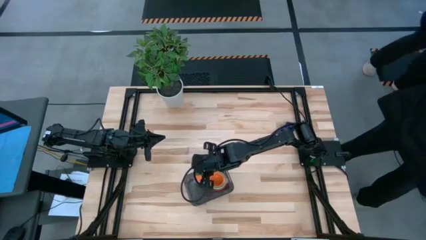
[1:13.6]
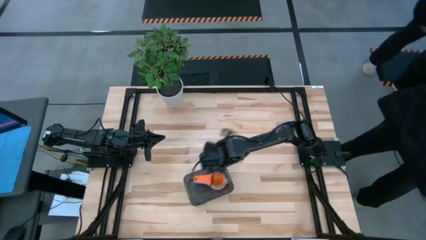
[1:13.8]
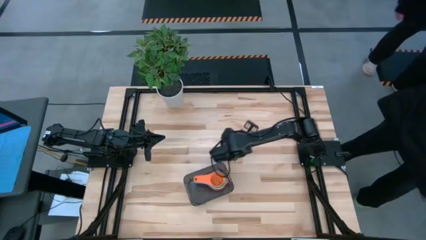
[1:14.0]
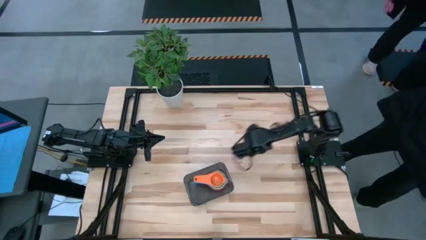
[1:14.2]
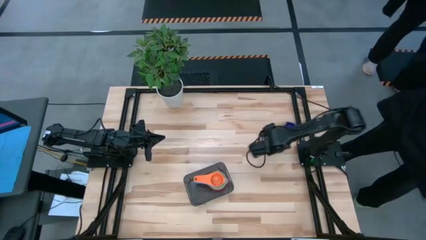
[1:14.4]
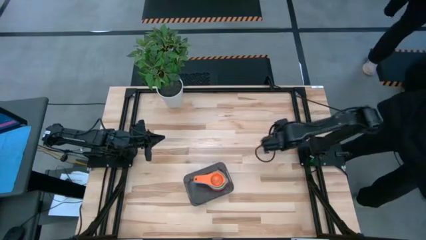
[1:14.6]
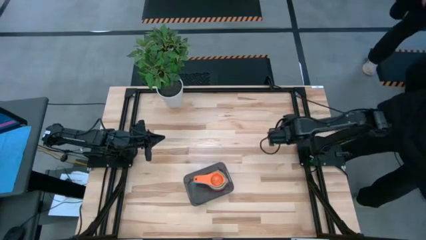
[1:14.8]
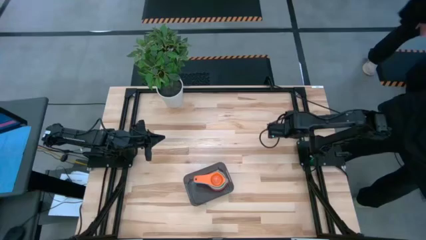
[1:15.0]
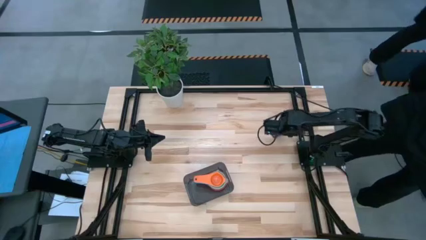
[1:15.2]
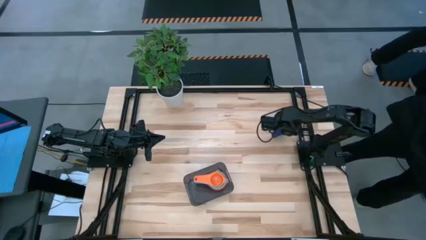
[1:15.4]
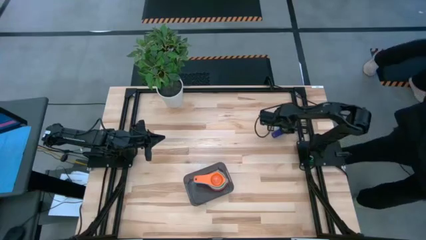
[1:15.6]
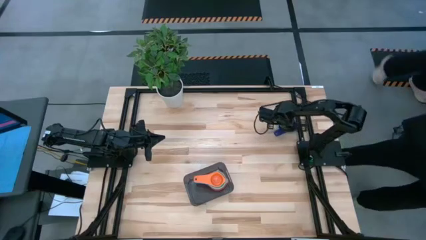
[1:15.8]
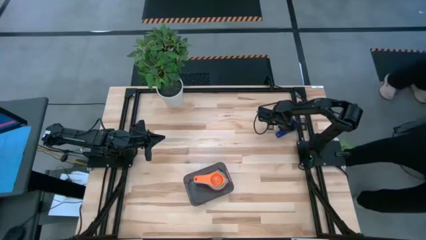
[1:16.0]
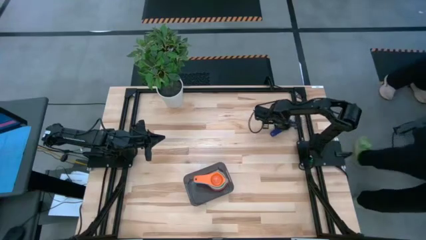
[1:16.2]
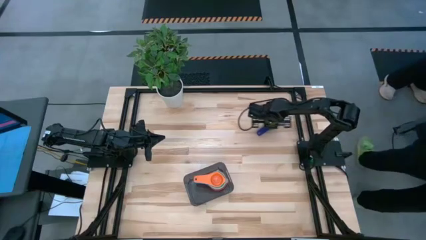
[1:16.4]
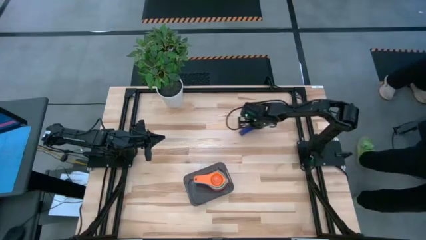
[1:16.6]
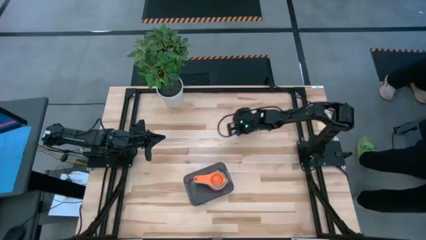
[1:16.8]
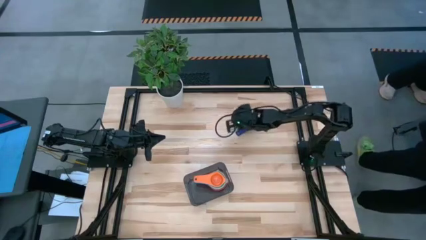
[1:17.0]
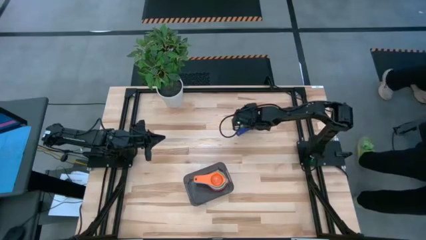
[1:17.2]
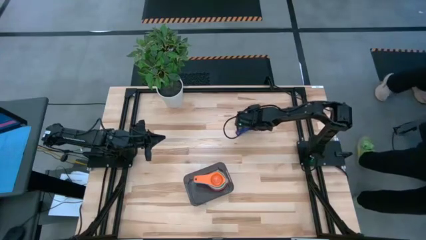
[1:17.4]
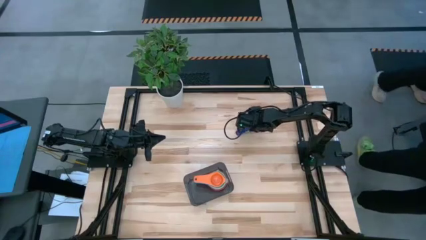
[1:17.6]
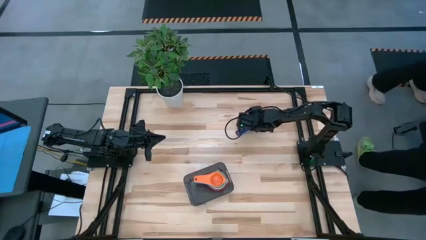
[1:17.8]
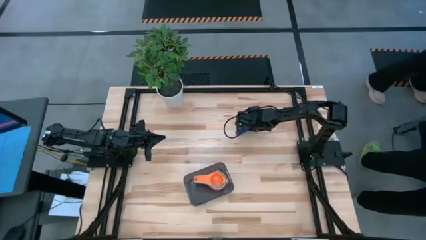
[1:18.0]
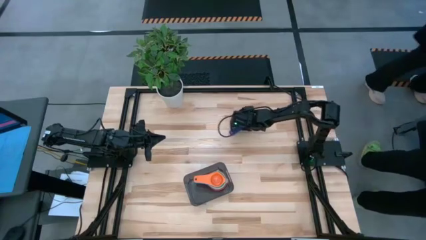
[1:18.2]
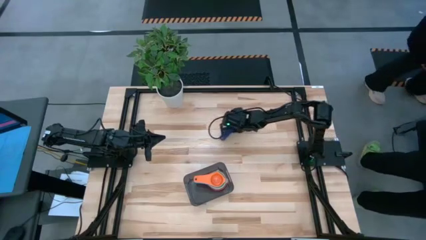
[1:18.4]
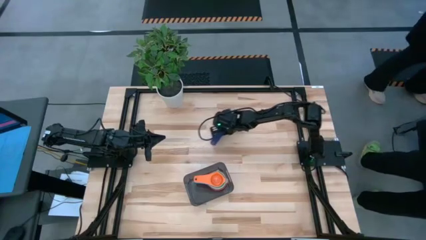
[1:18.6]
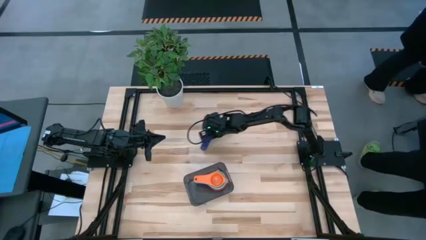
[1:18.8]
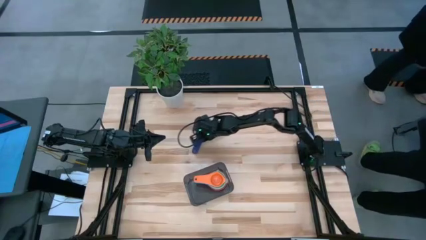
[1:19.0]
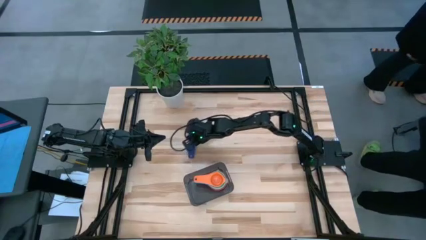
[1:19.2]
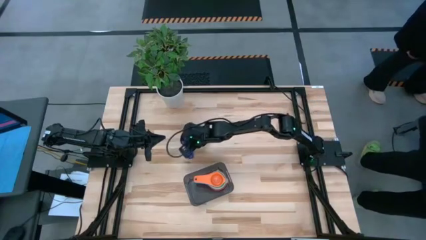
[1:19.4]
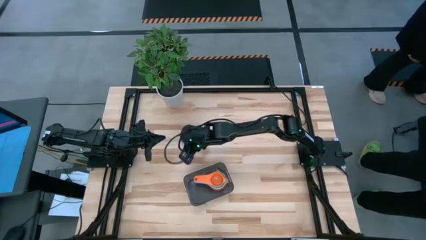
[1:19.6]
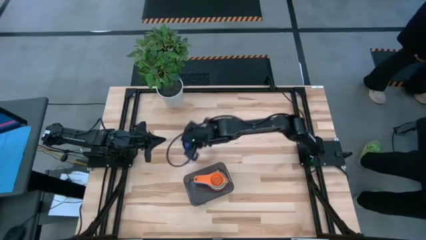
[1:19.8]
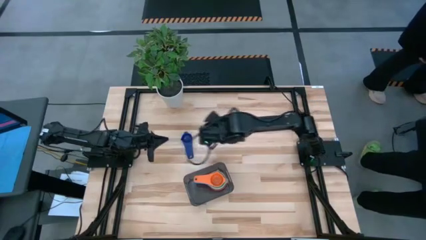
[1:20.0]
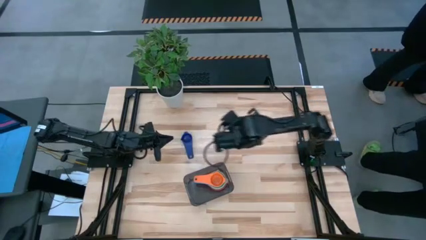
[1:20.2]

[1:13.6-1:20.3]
Task: Nest measuring cups in basket
Move the dark blue measuring cup to the center of the table

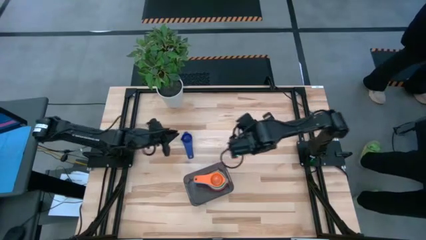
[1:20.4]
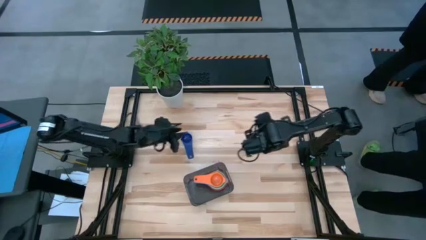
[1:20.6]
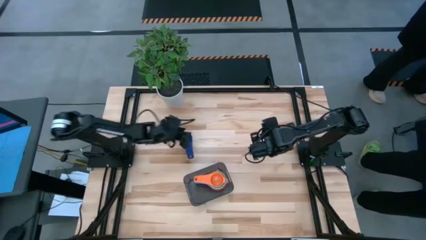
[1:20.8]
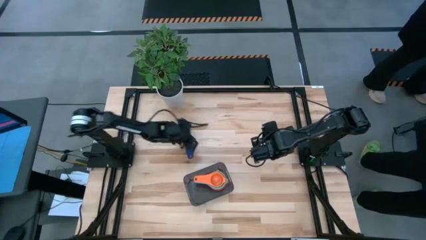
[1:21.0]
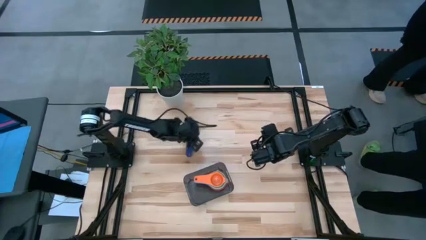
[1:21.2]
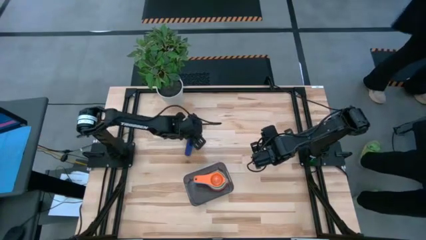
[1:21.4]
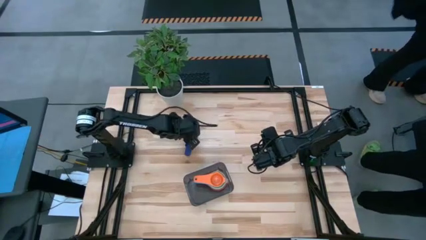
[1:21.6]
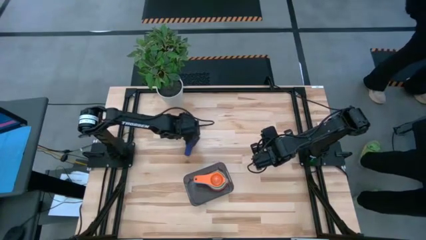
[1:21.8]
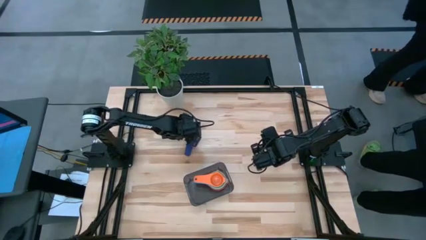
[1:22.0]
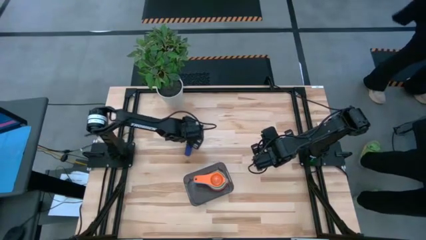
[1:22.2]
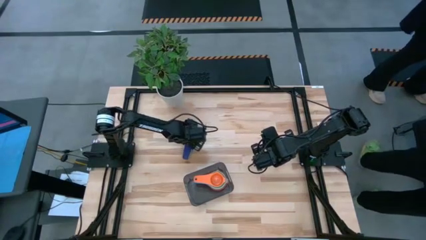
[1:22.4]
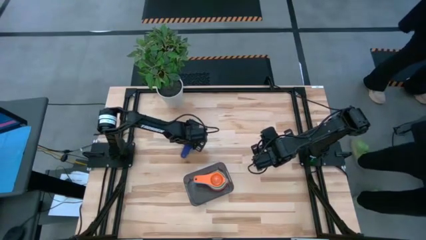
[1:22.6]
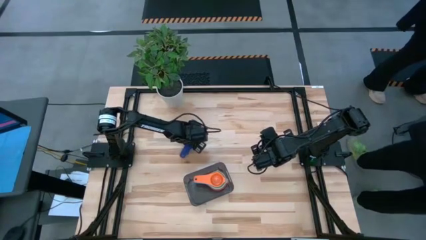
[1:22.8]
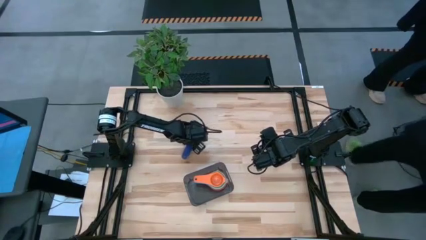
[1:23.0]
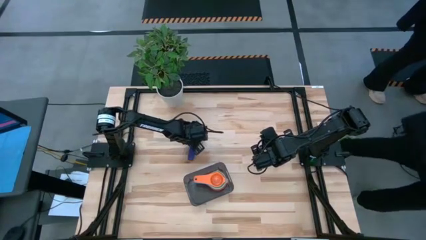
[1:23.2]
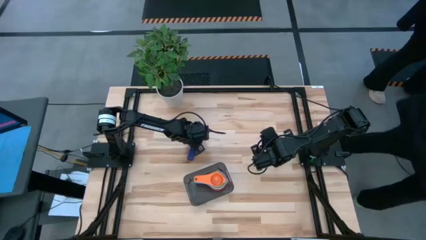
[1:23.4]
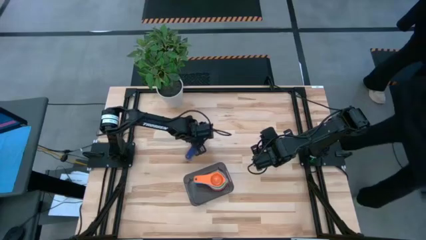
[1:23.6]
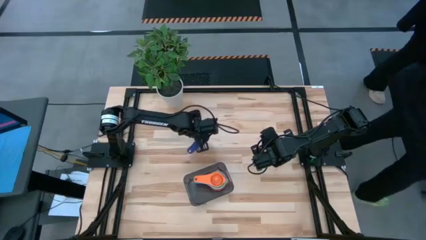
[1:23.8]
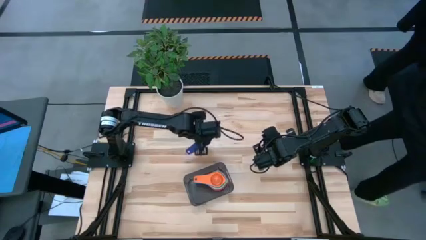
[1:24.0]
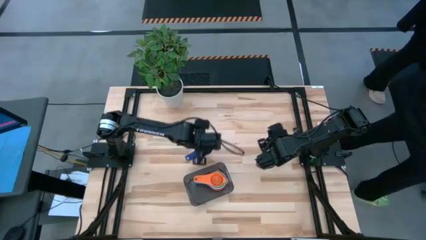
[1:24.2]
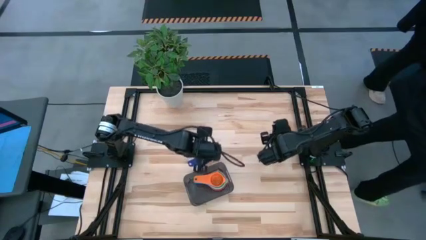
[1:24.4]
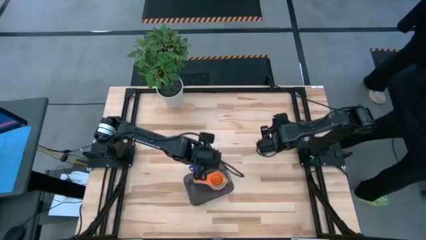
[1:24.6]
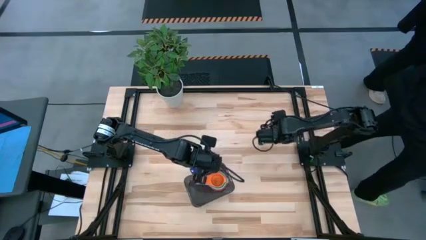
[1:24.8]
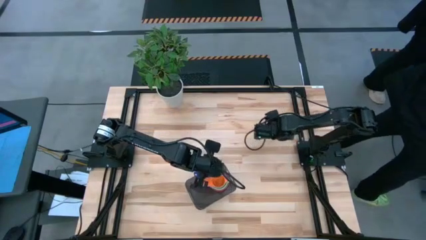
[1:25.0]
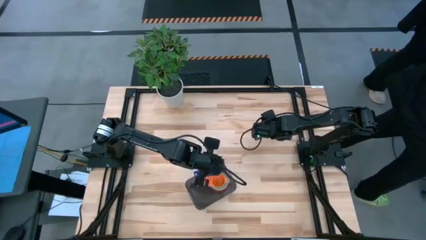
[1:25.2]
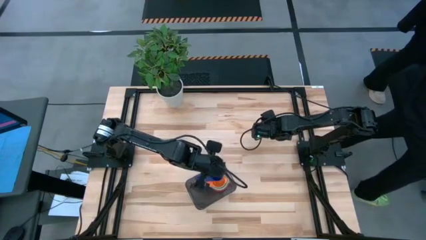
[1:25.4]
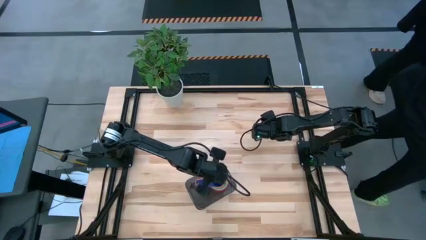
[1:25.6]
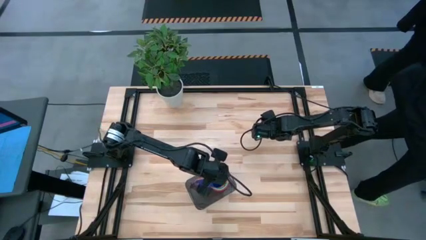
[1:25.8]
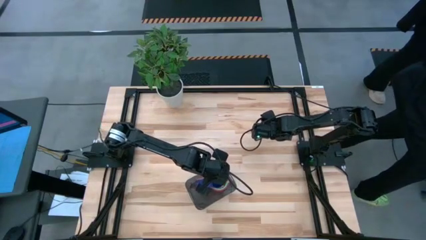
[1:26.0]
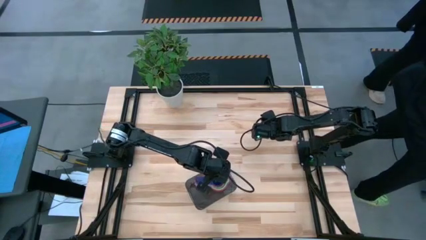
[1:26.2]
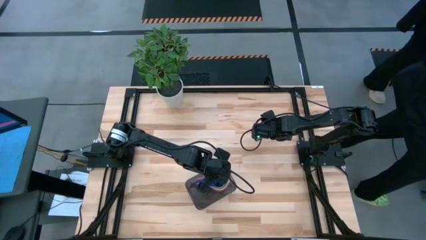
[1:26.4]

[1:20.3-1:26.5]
Stack the dark blue measuring cup on top of the orange measuring cup into the black bin

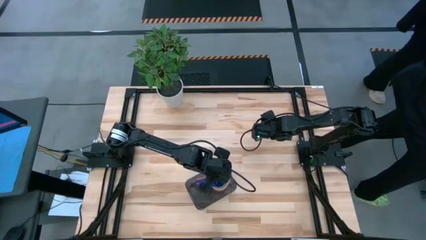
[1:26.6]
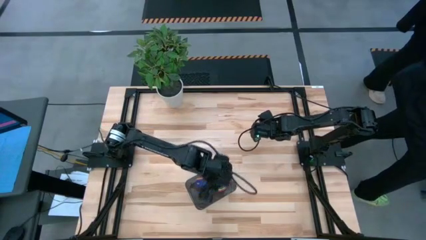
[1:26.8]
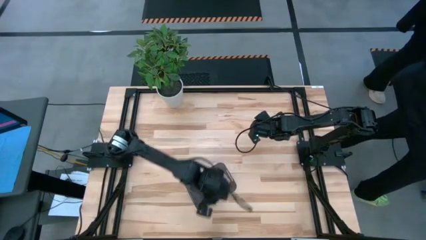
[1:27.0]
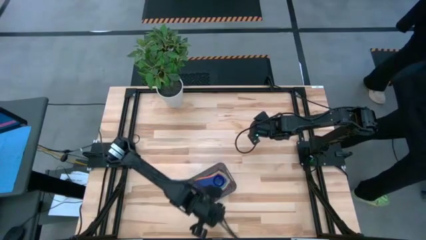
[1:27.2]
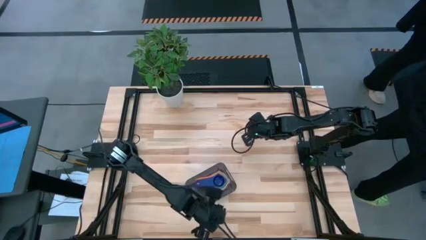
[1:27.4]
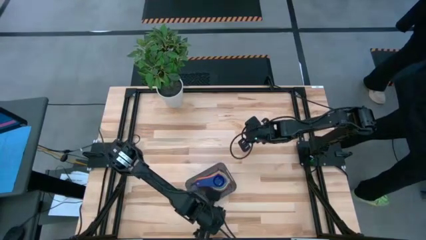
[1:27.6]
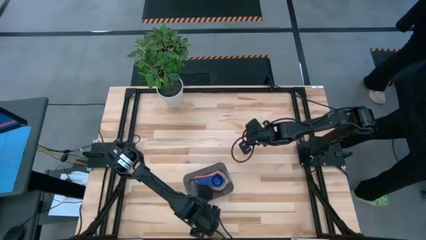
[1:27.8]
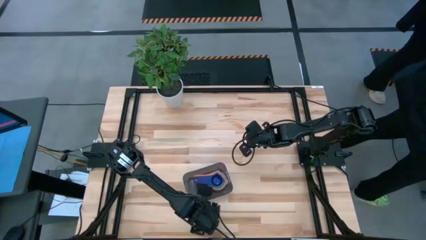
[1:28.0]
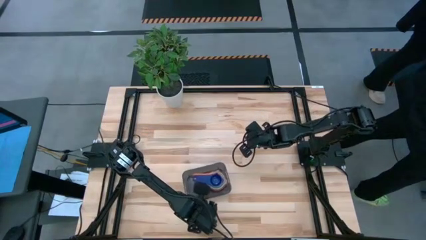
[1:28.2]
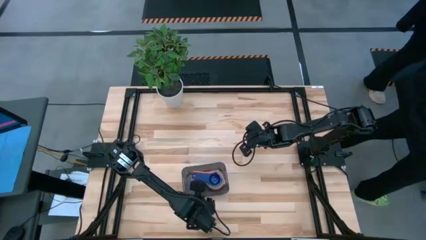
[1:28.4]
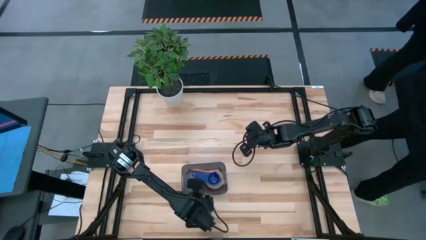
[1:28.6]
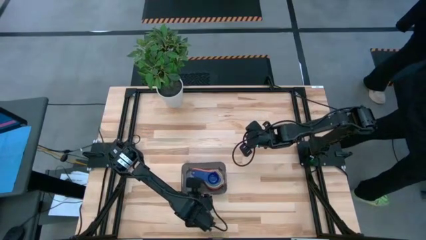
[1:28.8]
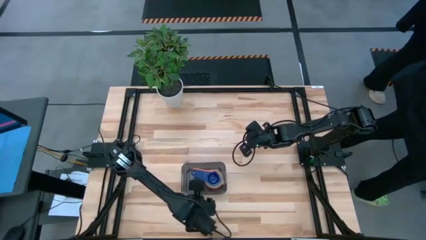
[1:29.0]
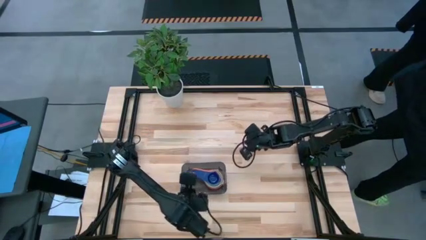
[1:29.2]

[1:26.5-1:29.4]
Adjust the black bin
